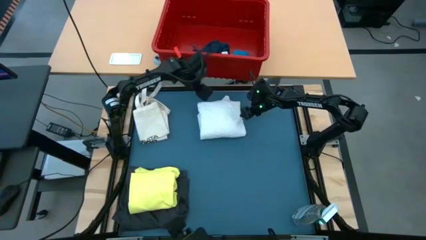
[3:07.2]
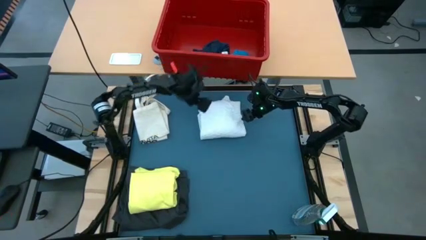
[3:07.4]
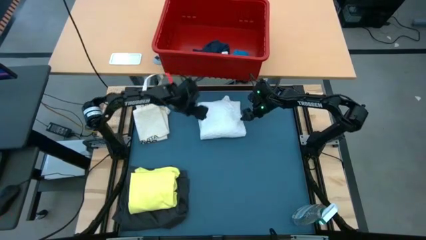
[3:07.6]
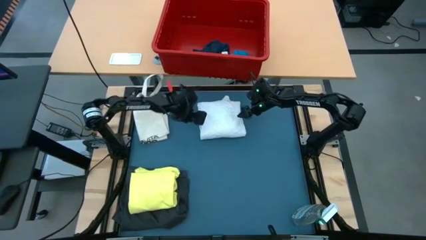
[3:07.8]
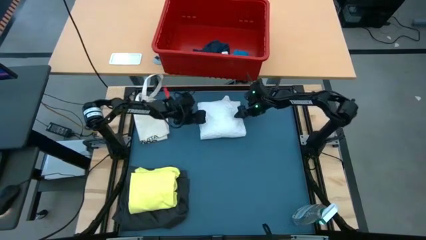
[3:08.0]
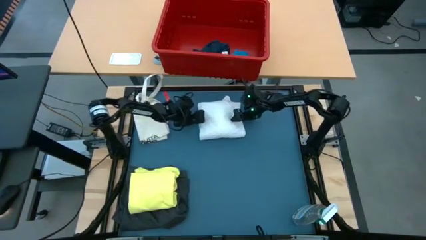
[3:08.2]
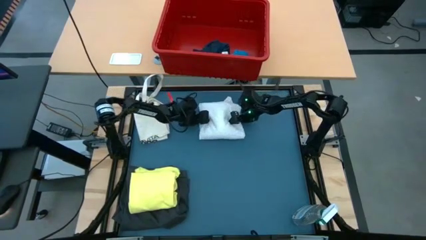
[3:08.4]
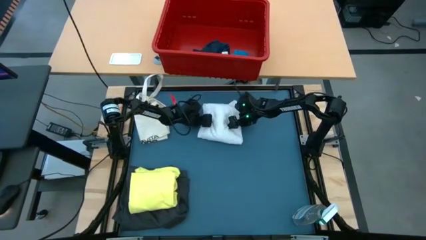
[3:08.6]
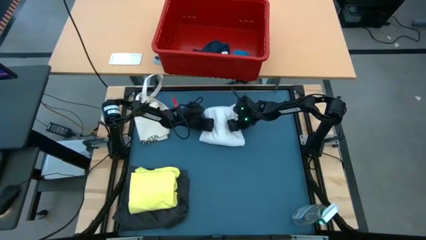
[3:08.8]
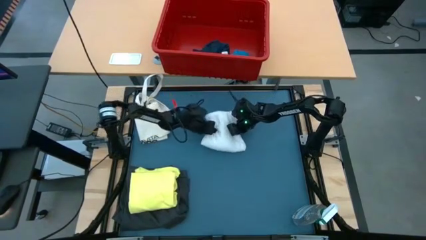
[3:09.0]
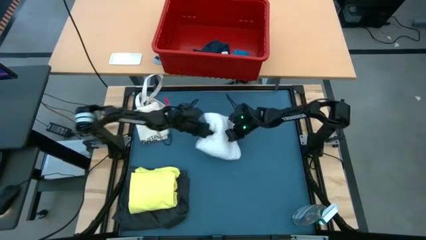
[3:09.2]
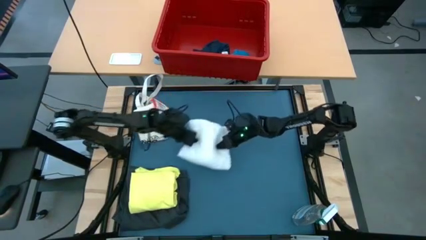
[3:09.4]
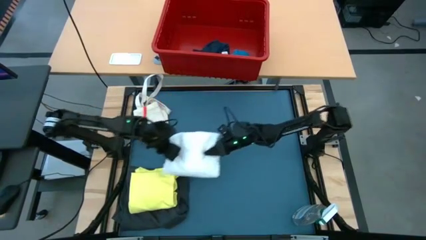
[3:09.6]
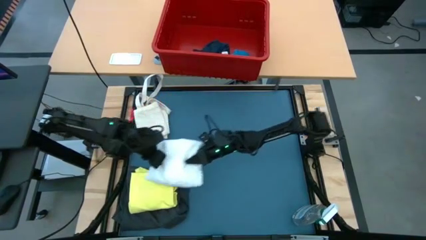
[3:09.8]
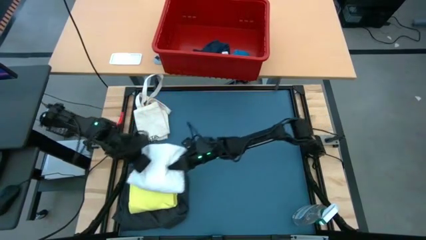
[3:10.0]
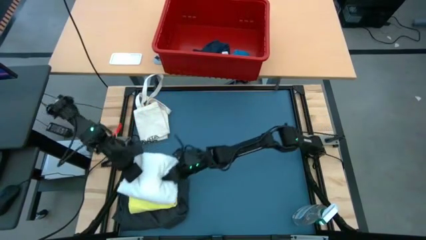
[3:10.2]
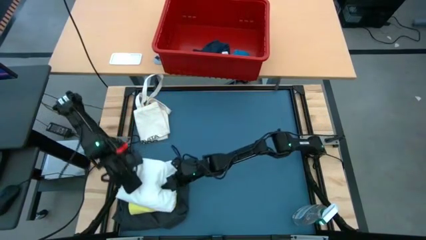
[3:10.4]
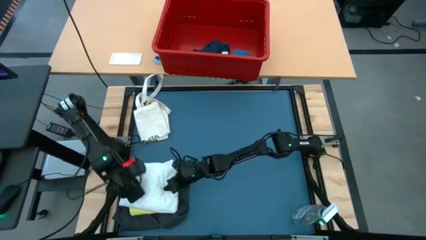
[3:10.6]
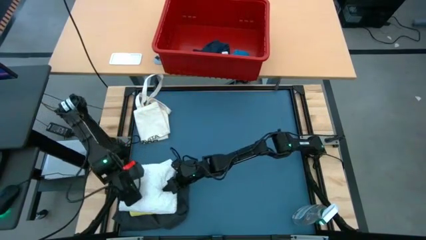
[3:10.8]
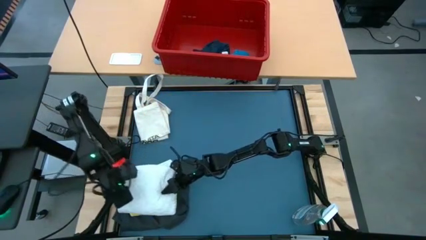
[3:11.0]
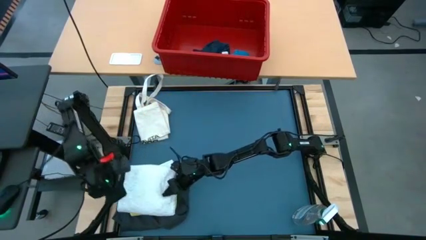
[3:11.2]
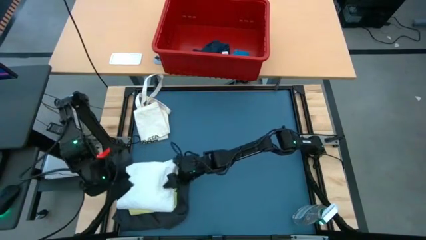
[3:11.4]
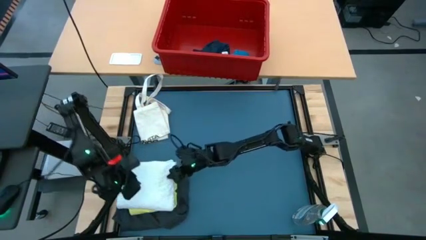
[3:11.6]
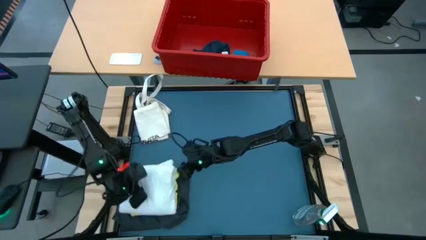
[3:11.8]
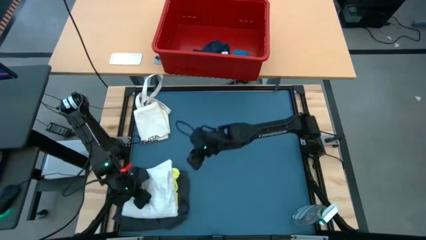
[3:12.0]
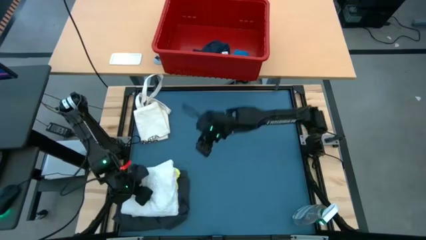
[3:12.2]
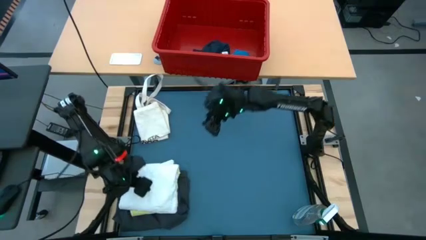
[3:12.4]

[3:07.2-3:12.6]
Task: Fold laundry
Stack the white blouse on top of the yellow shirt

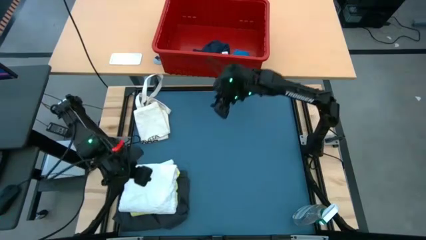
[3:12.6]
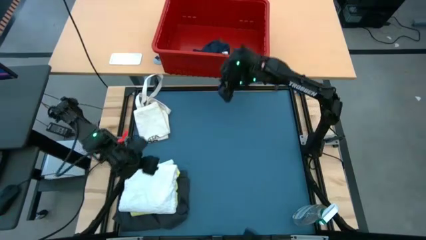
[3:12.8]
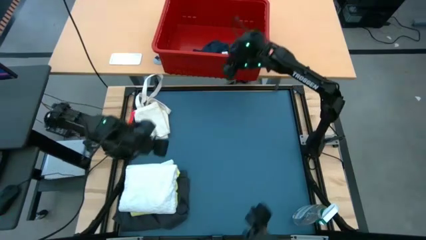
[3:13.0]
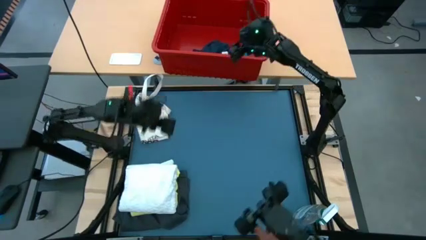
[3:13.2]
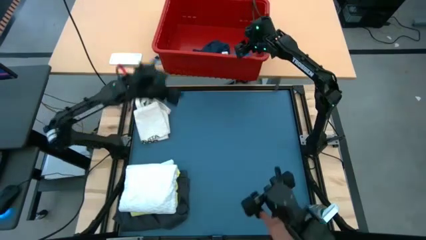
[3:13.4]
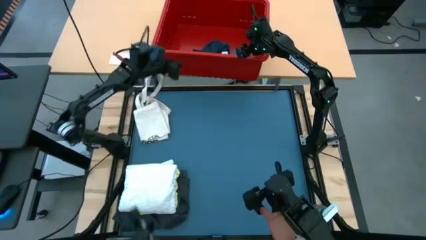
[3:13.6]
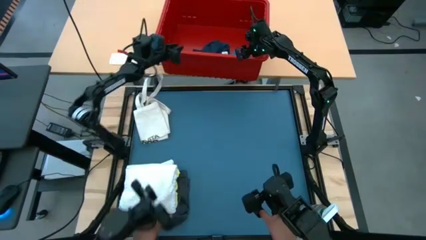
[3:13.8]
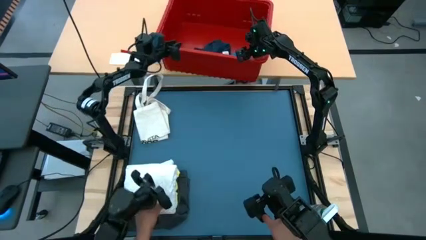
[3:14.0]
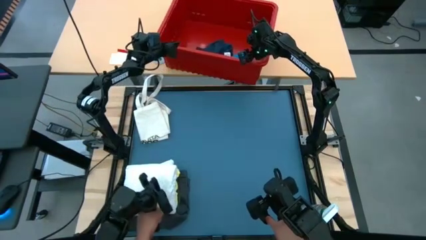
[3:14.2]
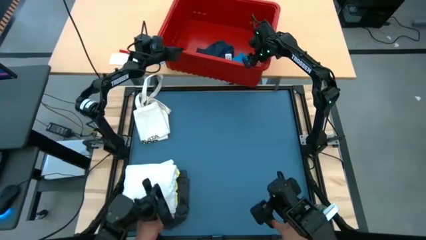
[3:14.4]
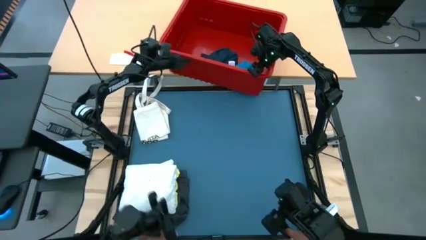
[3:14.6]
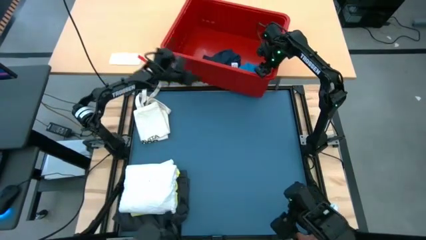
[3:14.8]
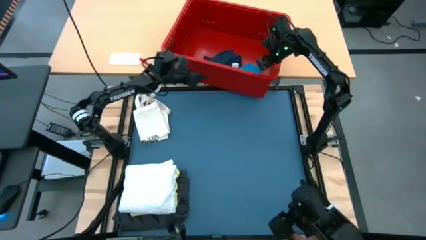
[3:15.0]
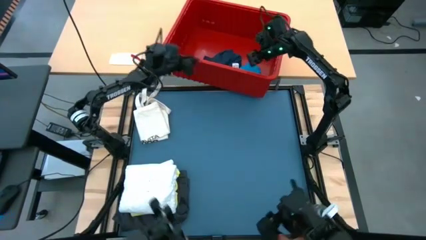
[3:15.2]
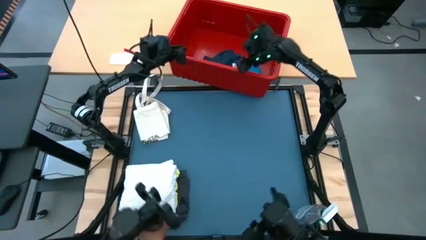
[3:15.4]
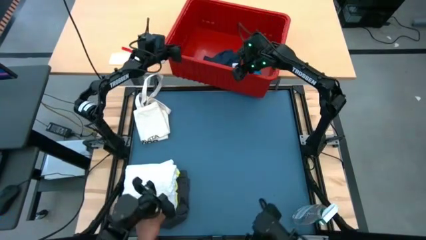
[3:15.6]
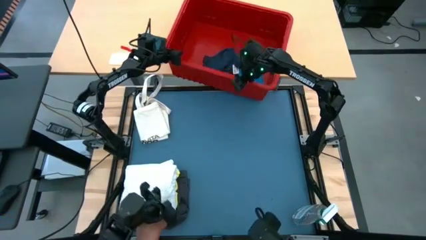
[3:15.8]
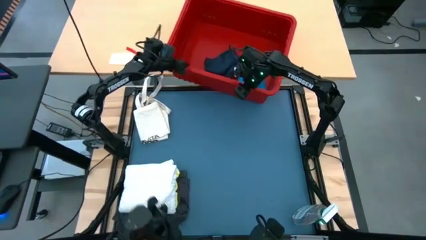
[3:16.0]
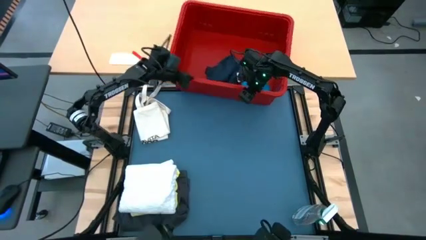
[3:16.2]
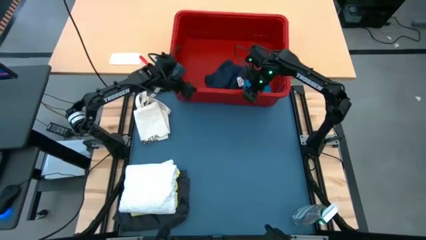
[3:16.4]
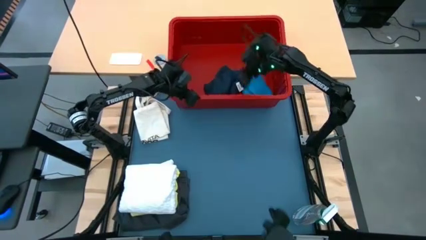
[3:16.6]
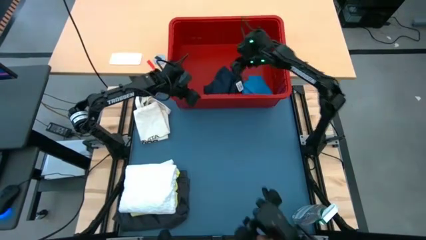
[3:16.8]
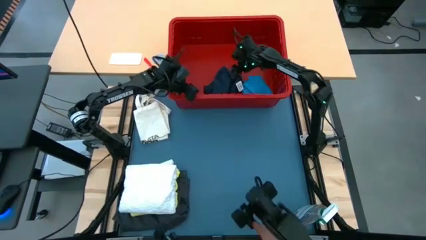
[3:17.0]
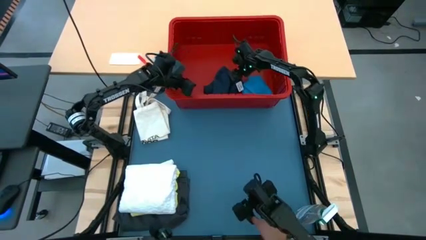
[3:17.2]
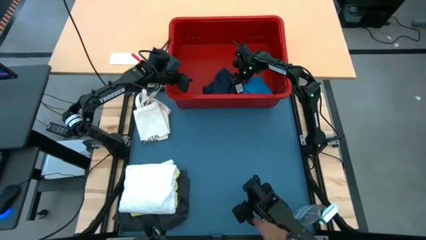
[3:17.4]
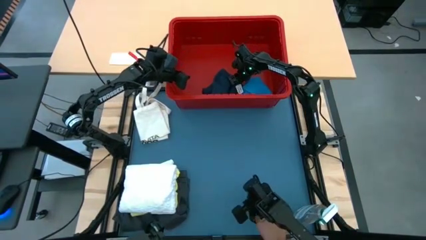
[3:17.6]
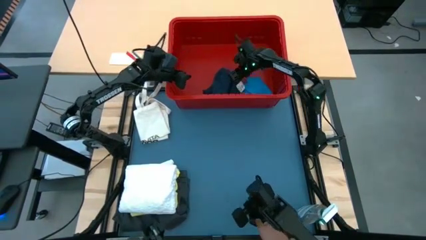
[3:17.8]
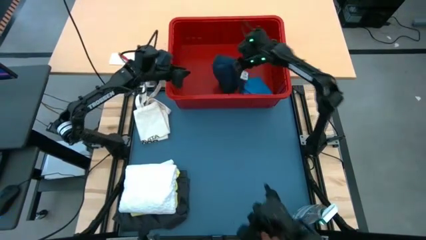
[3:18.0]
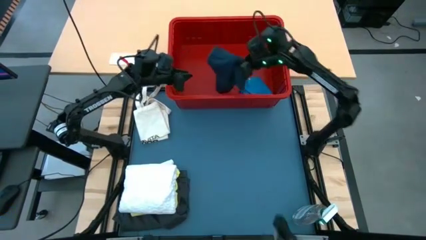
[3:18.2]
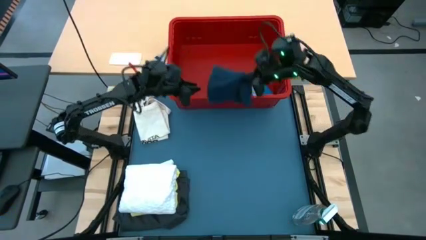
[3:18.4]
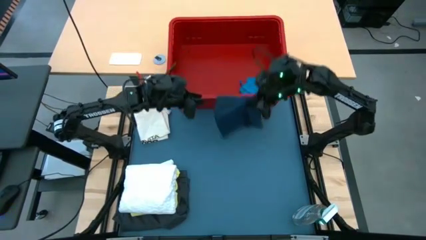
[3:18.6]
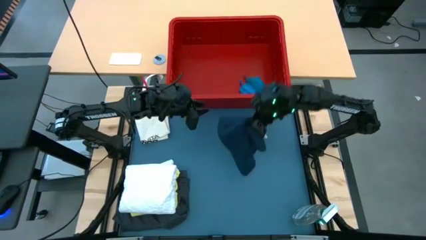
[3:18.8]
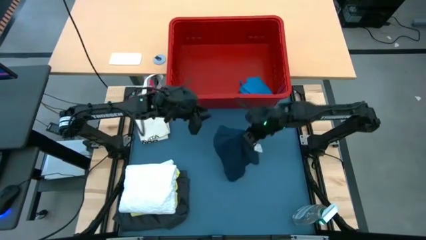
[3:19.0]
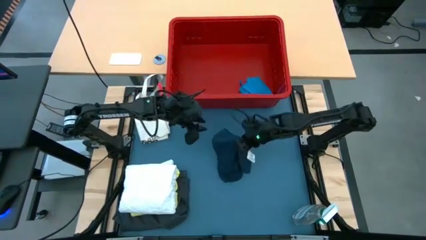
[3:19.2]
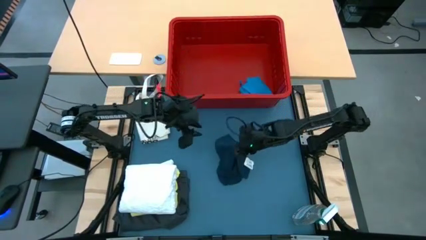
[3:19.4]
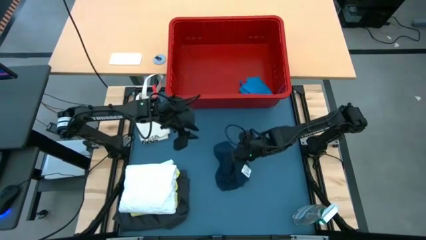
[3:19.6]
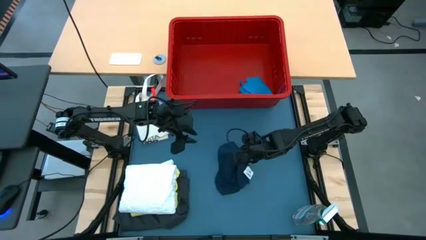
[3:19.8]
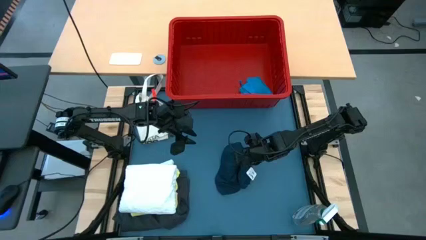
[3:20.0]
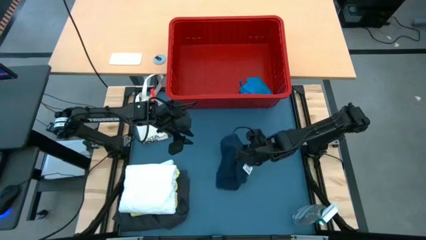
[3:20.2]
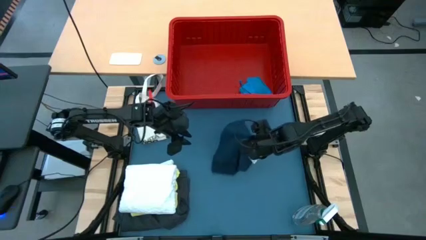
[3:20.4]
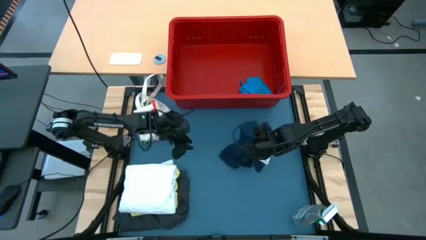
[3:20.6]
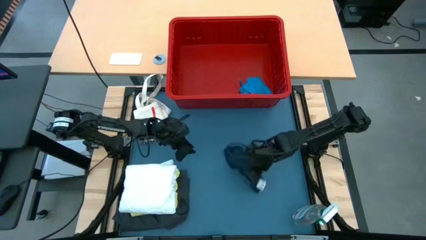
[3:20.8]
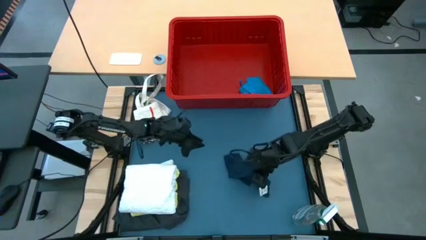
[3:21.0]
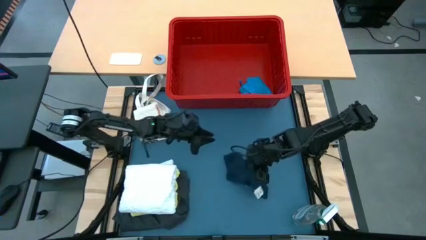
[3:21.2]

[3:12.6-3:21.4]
Remove the black shorts from the bin

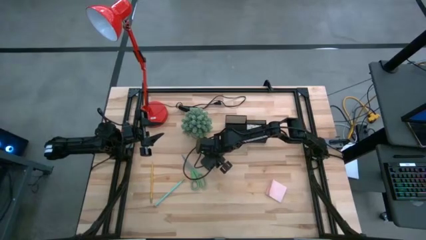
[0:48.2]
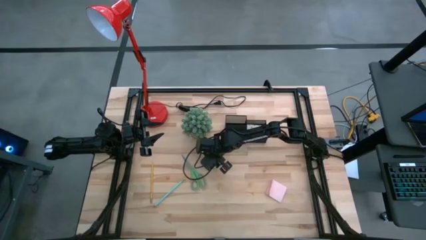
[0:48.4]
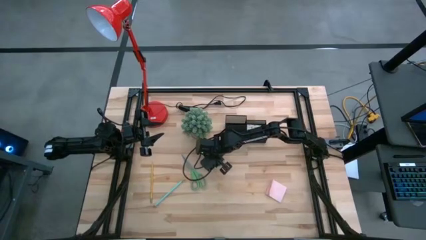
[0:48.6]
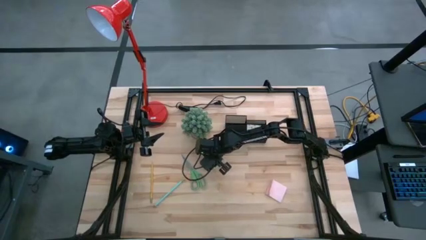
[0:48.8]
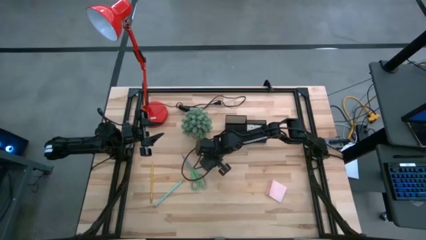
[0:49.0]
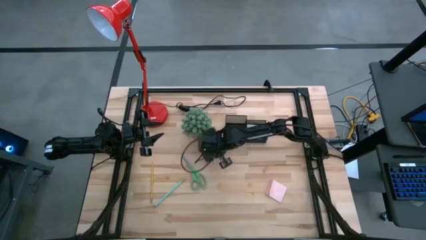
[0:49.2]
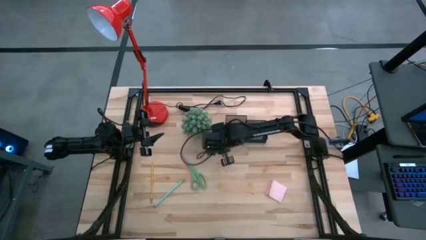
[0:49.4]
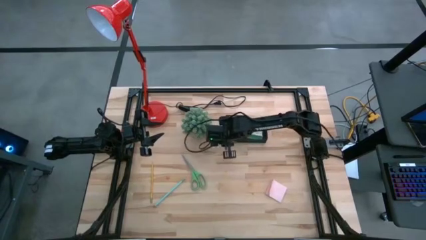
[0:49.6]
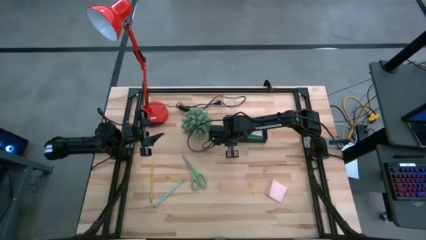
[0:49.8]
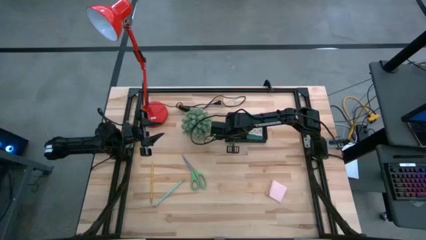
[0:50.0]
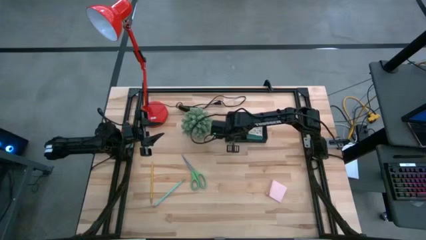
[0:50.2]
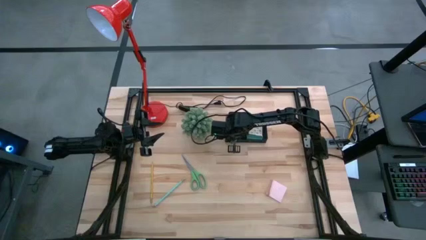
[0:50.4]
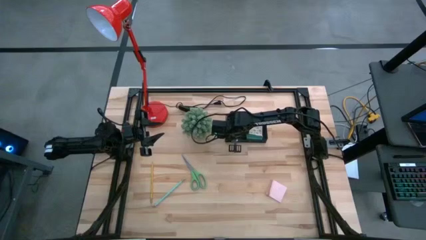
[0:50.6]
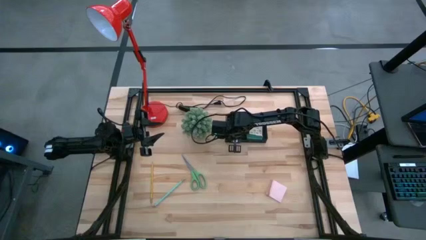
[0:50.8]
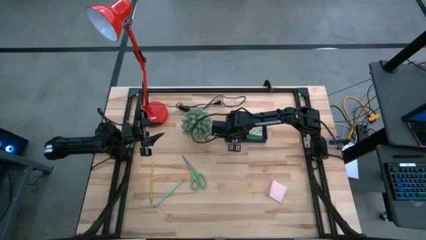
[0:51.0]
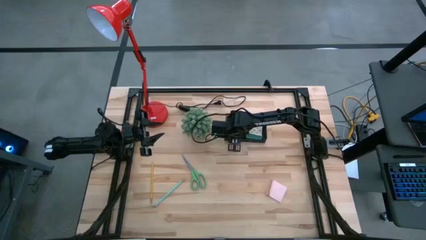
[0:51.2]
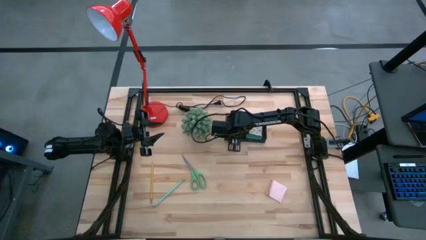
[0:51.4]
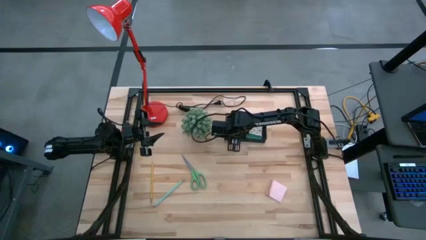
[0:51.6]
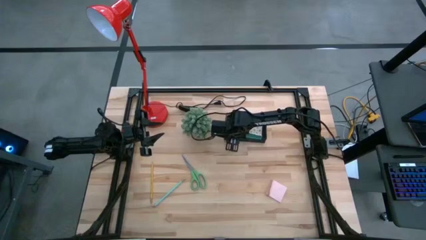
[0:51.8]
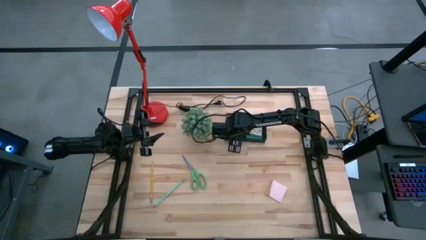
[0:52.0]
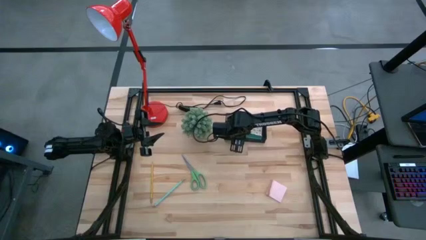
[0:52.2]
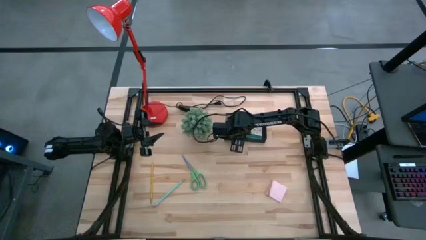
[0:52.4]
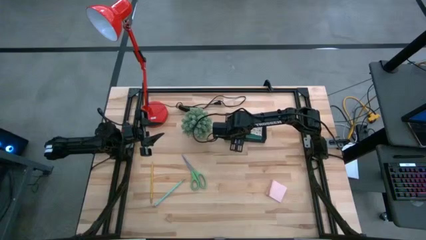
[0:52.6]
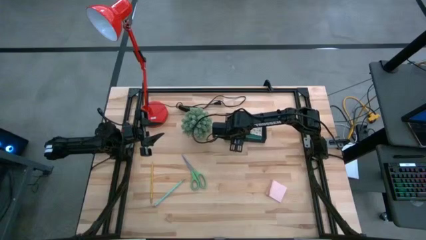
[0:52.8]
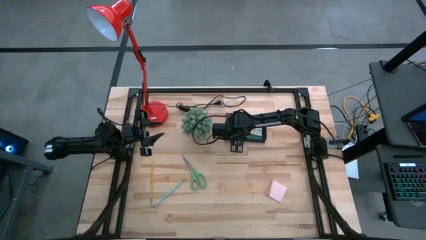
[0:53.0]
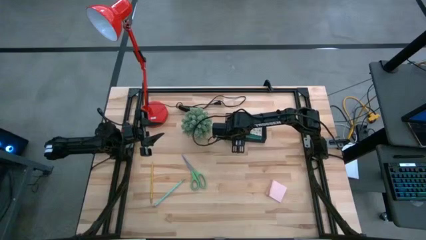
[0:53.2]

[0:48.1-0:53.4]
Task: Pick and place office supplies into organizer
Put the pink eraser into the black desk organizer
